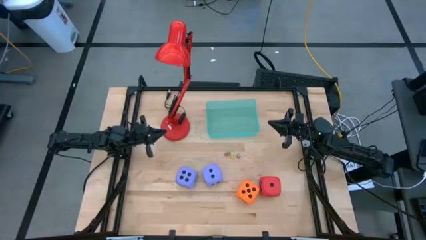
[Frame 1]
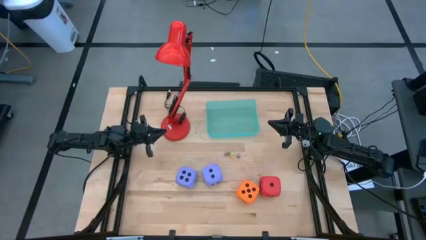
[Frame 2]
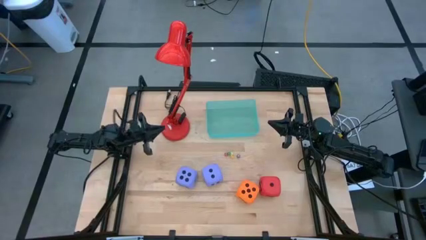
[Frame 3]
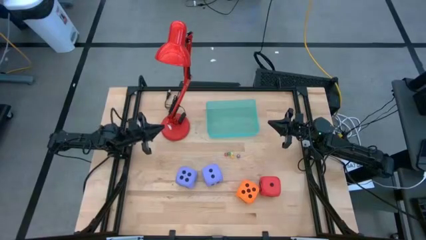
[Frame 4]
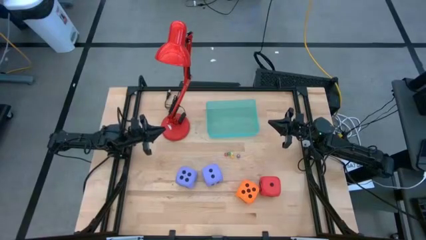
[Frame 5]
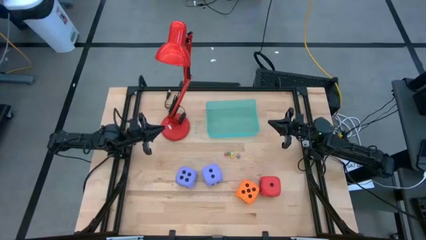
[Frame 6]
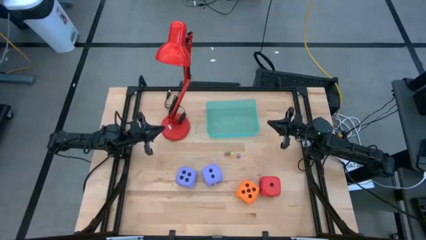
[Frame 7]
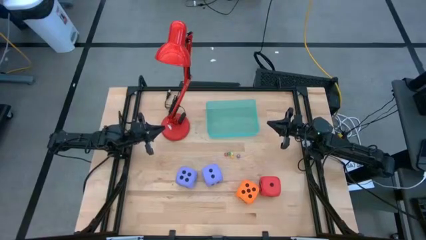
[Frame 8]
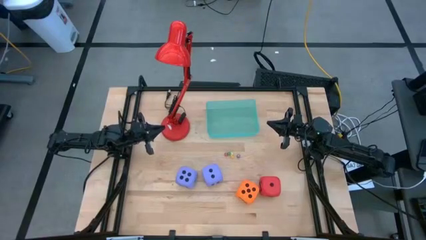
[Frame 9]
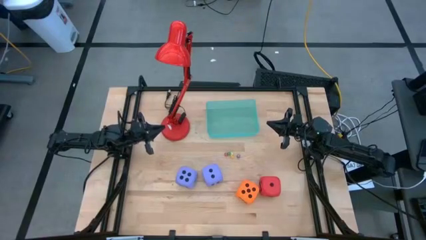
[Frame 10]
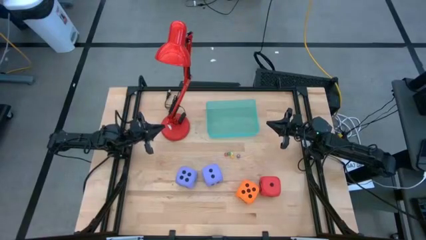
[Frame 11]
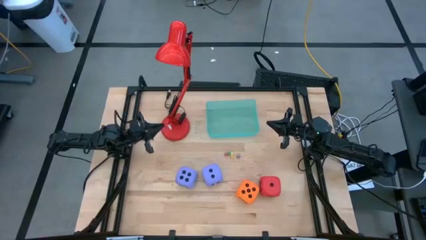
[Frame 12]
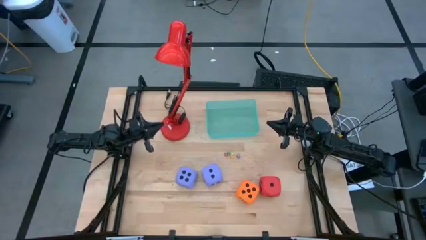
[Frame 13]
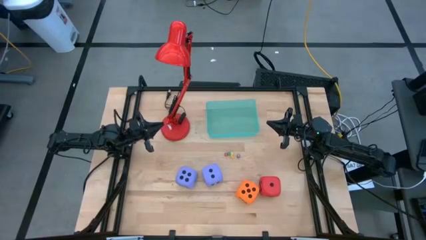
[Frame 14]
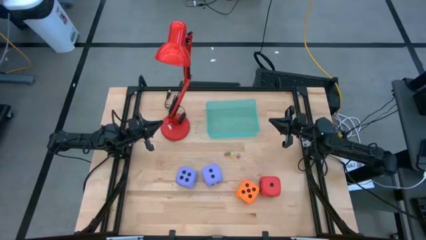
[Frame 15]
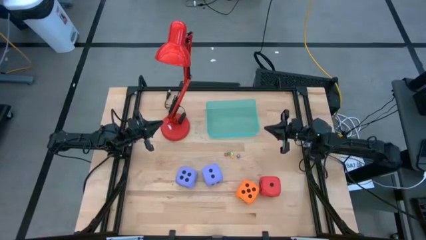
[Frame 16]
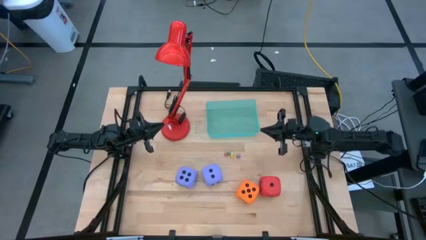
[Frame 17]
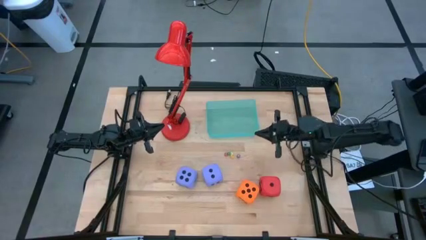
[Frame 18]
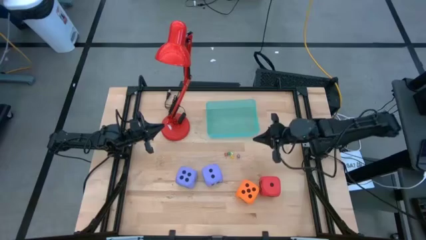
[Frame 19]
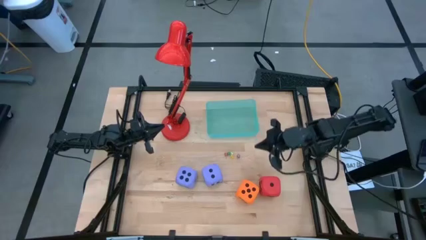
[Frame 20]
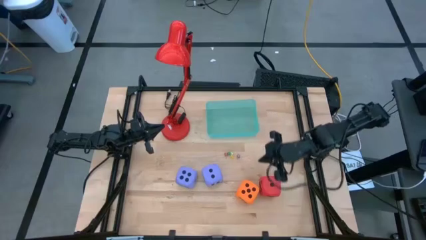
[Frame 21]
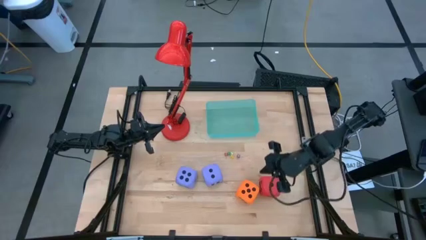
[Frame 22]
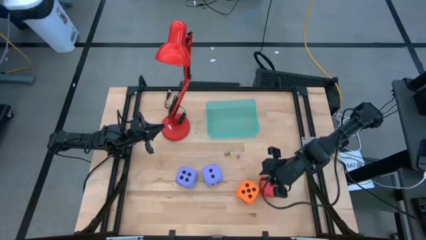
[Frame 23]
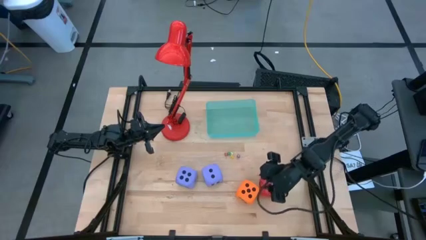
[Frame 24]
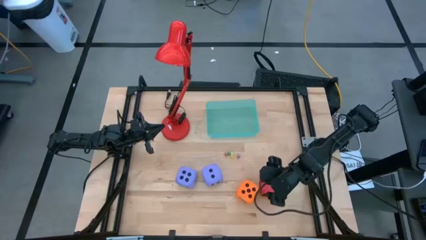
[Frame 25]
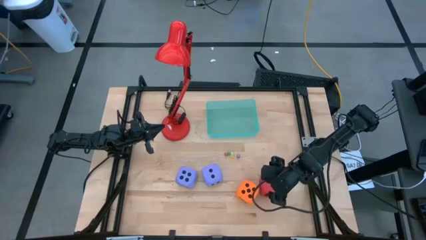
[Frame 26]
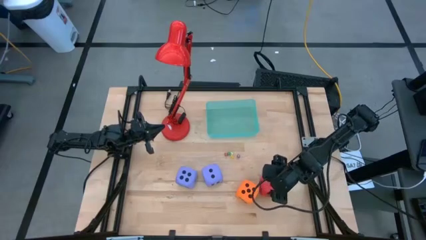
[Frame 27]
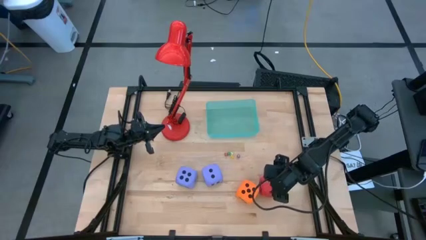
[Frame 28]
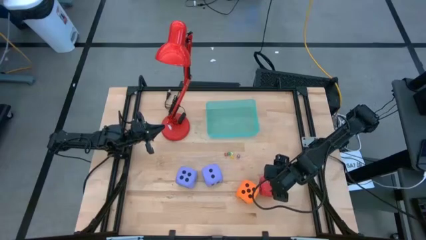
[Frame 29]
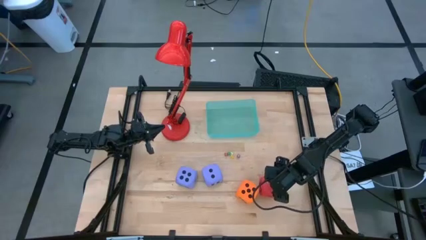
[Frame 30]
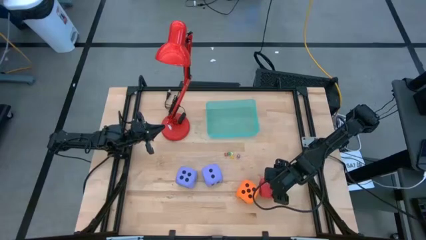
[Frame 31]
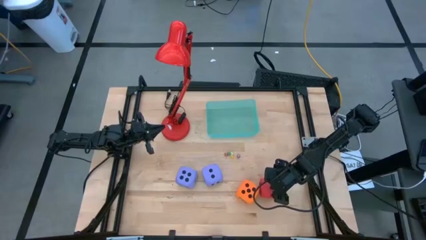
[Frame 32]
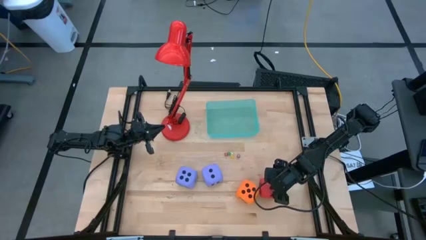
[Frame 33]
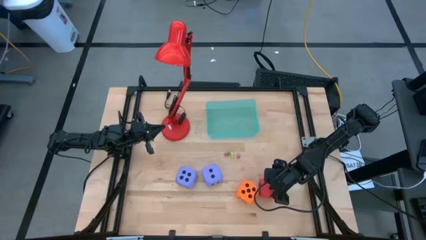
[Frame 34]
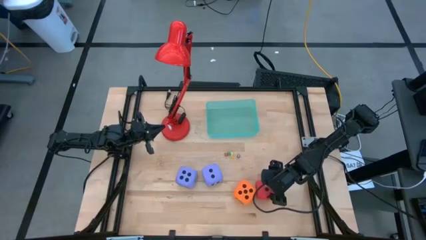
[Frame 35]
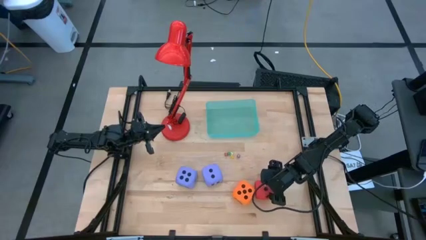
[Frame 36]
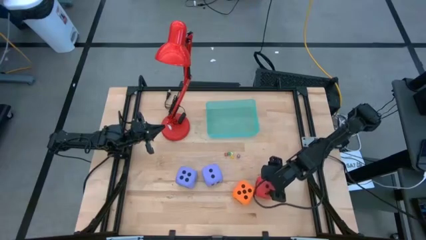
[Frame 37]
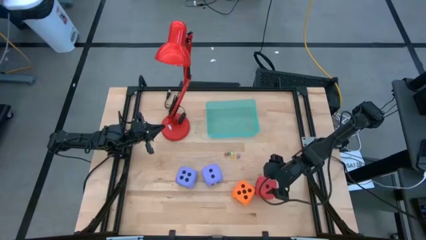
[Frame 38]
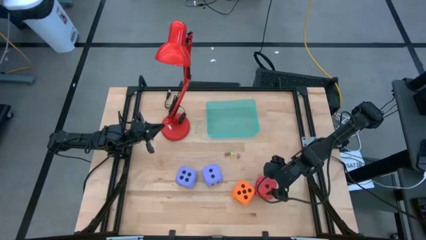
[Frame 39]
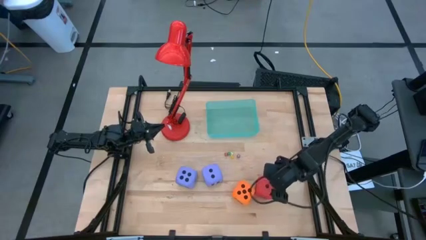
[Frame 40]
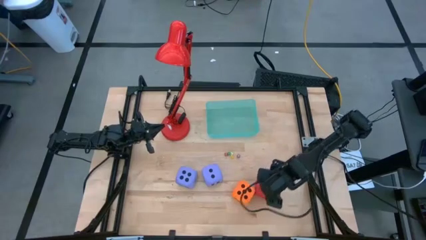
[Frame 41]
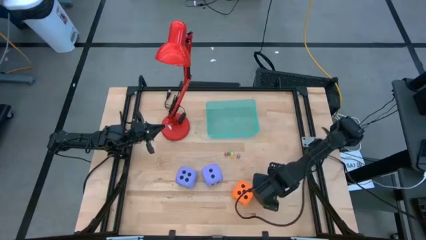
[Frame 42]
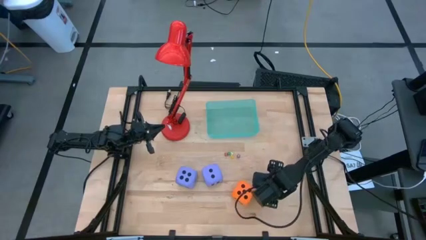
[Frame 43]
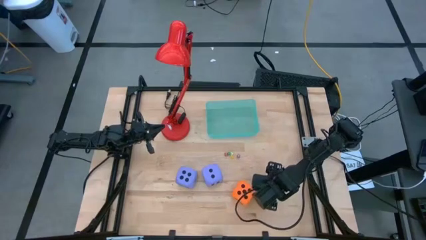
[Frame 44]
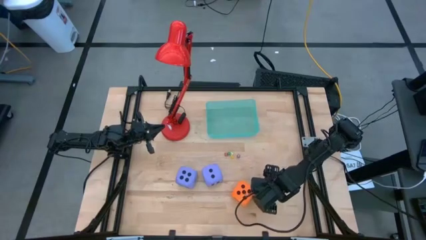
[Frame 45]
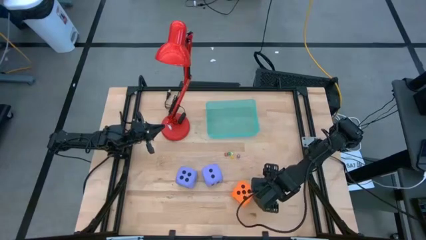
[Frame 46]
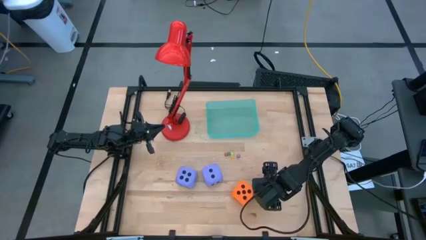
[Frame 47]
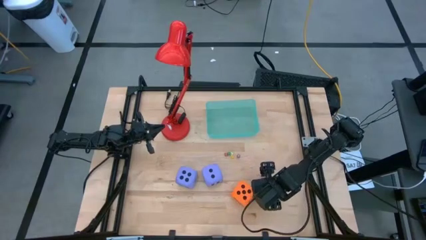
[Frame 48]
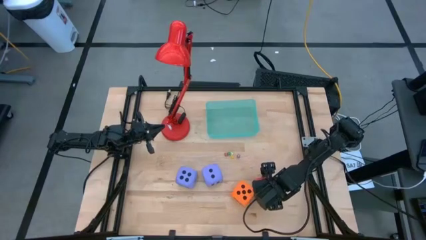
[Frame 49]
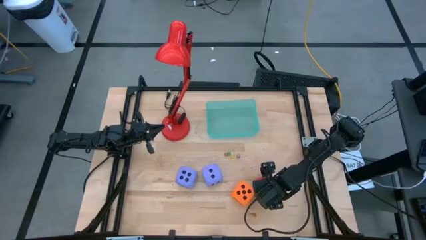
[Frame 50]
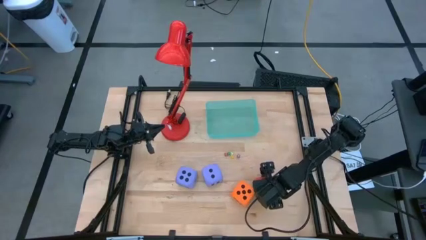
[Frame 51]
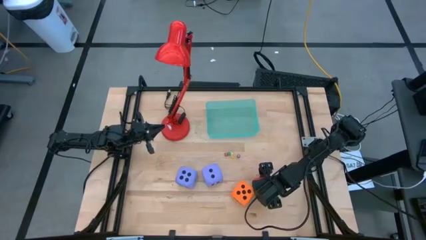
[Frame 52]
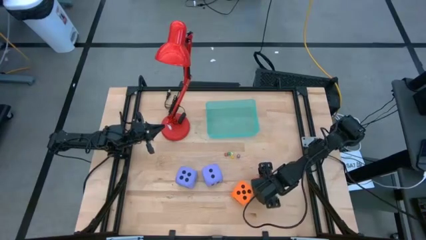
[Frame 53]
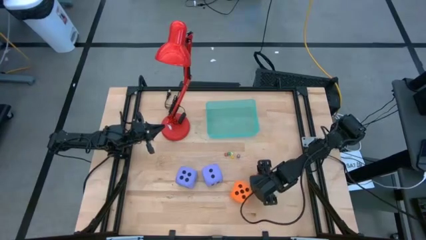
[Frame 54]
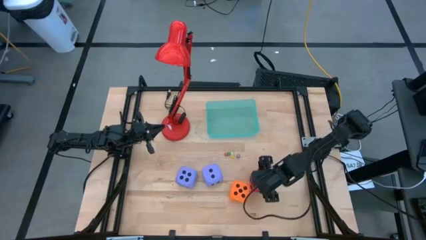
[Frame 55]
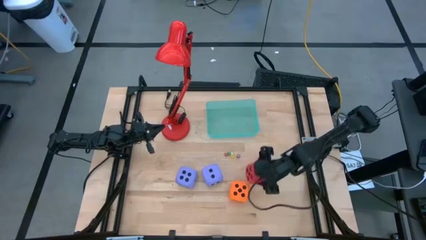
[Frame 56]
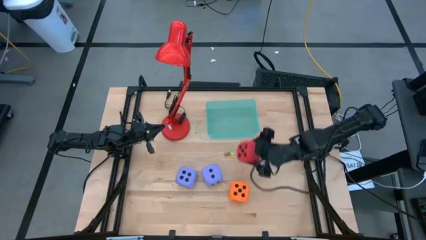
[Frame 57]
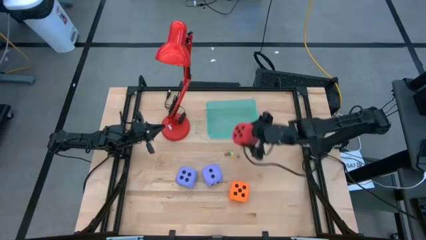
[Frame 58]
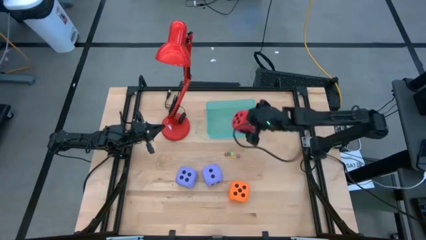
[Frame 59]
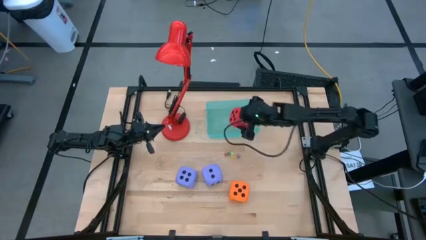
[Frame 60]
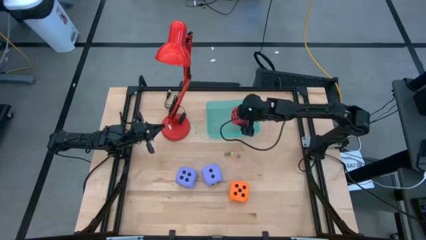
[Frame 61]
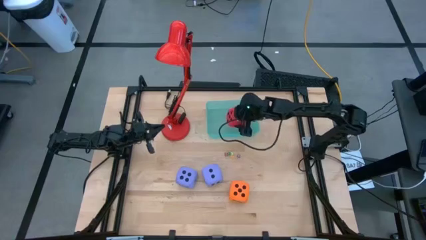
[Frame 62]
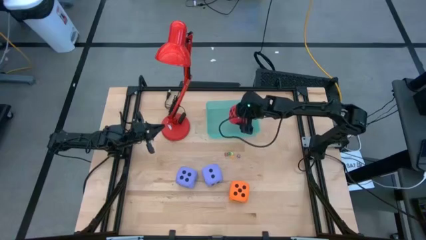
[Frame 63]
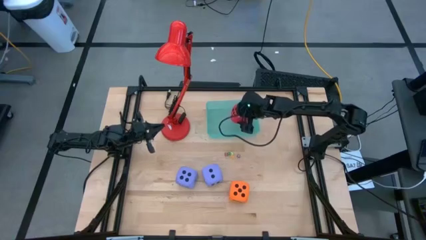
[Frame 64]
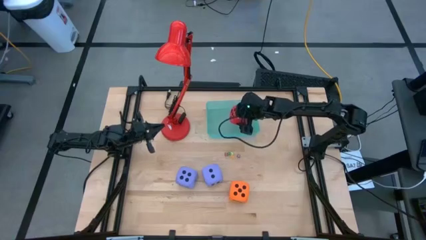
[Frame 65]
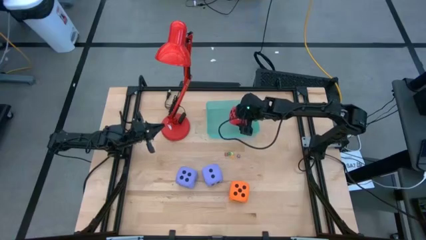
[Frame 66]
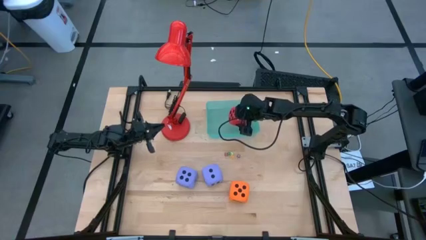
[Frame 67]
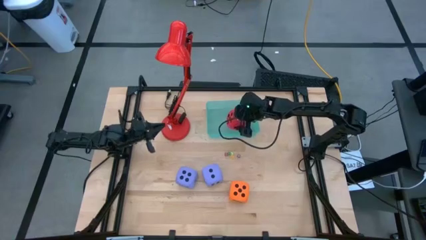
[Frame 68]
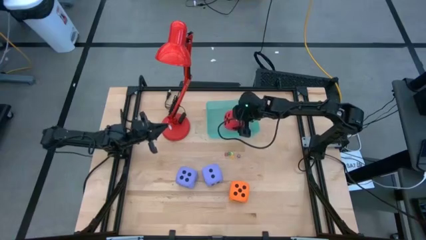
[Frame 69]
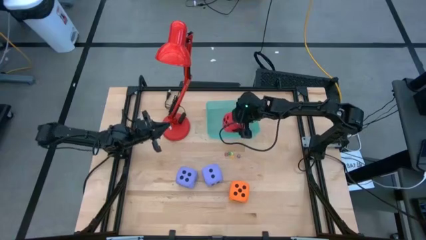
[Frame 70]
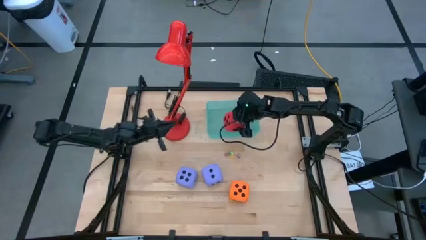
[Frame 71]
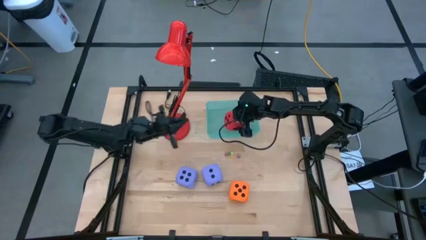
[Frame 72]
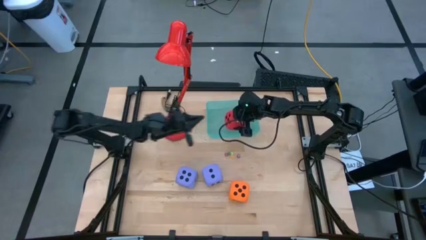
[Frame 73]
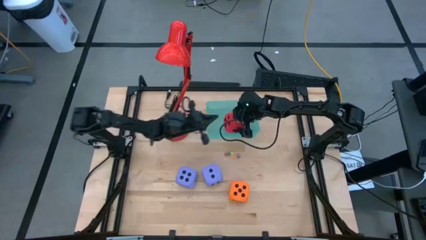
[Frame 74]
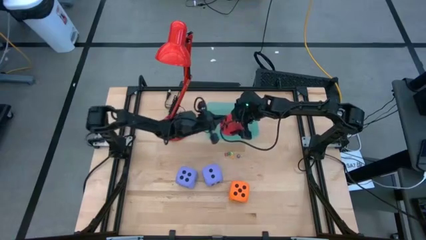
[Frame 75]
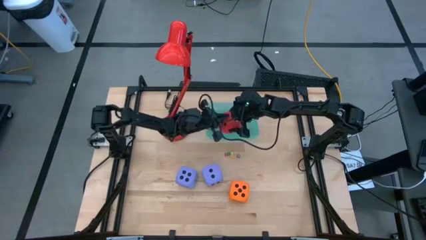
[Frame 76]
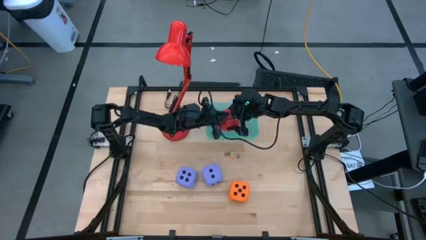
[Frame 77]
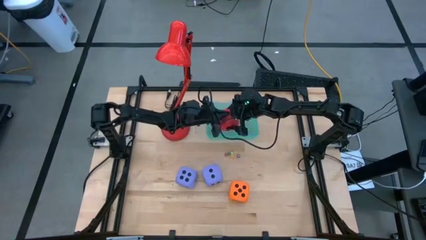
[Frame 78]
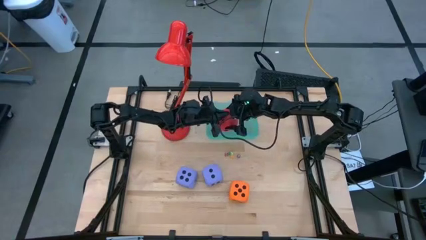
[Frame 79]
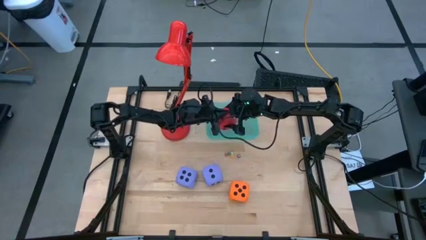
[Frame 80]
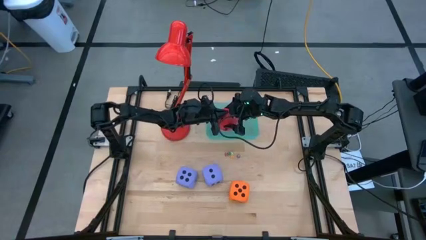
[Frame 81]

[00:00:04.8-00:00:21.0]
Task: Pick & Place Dice
Put the large red dice into the bin
